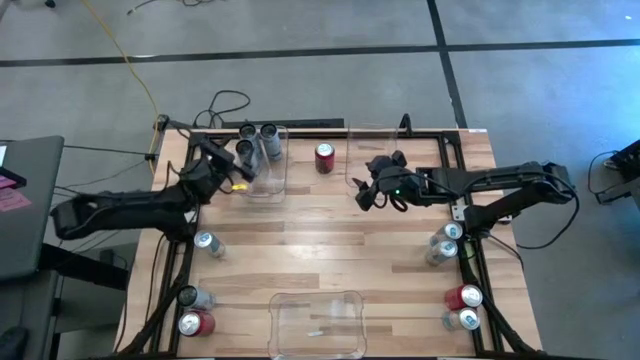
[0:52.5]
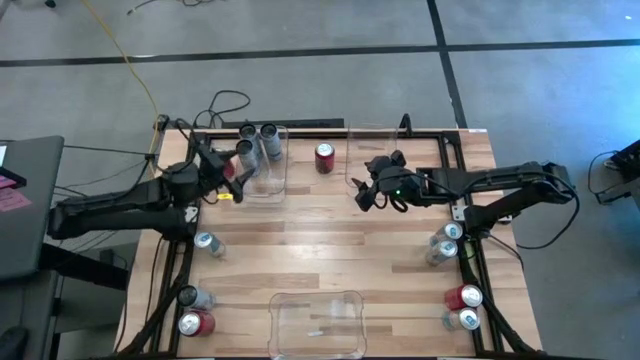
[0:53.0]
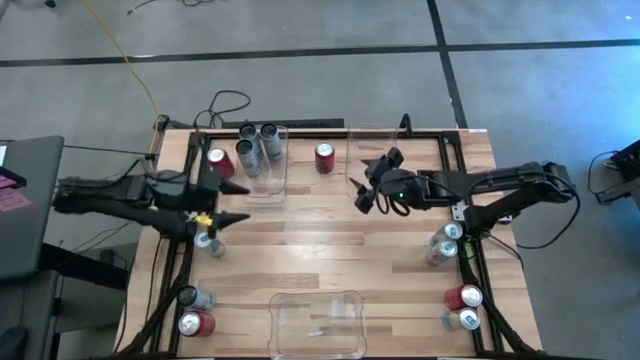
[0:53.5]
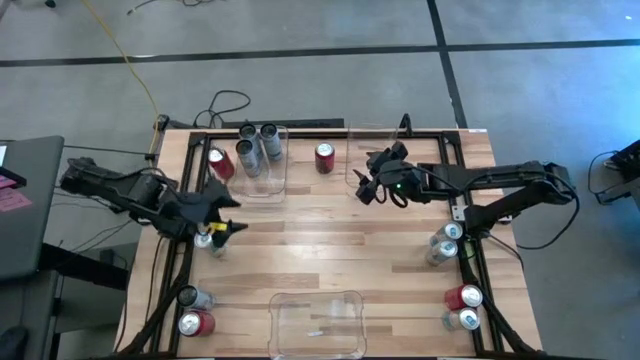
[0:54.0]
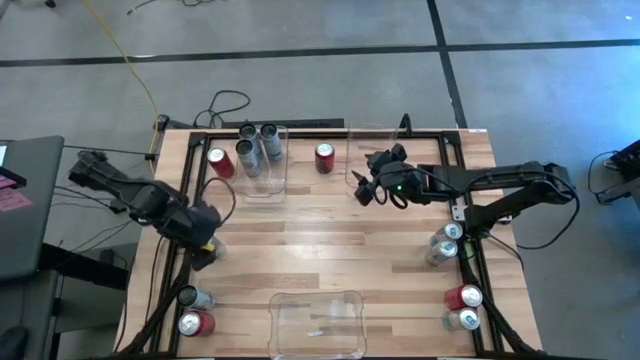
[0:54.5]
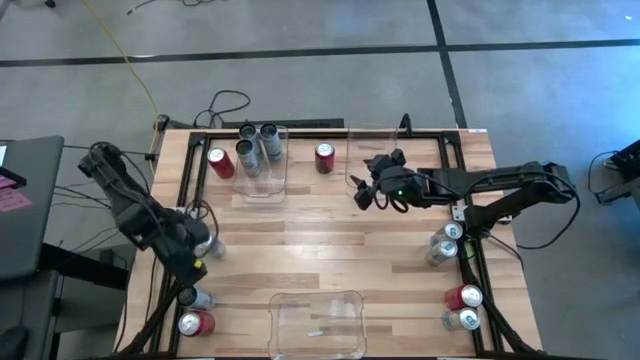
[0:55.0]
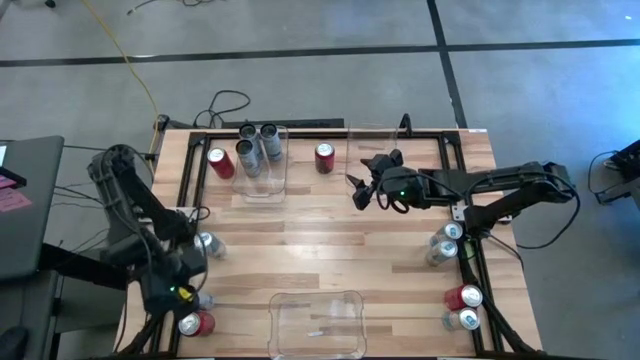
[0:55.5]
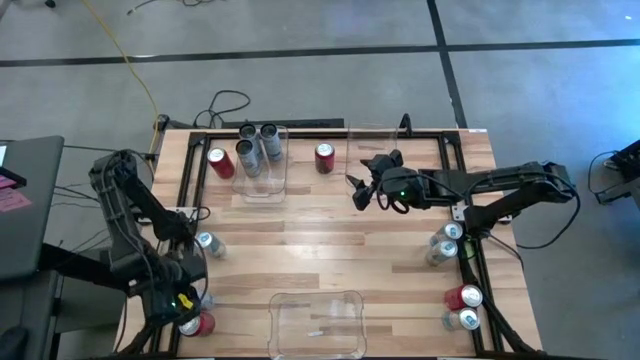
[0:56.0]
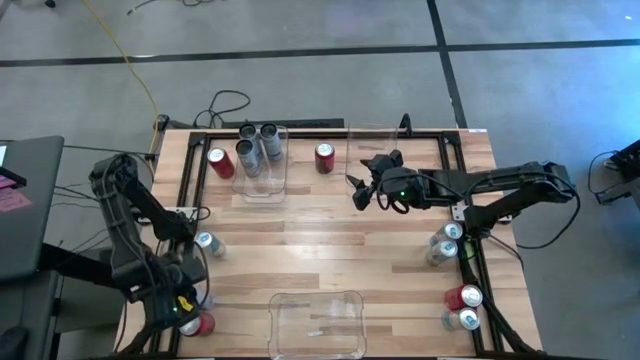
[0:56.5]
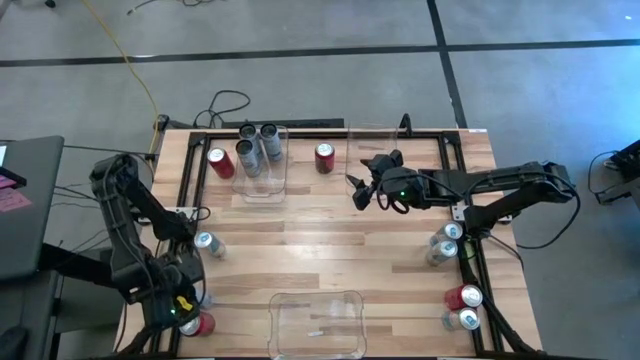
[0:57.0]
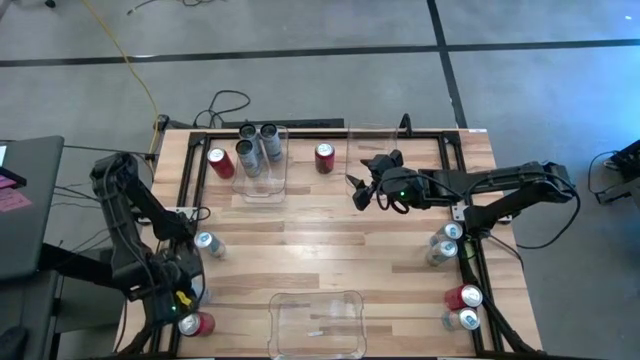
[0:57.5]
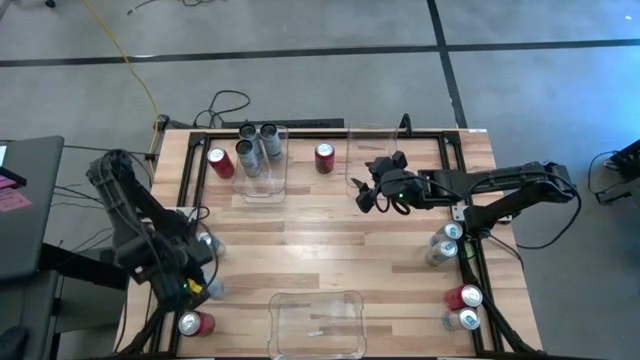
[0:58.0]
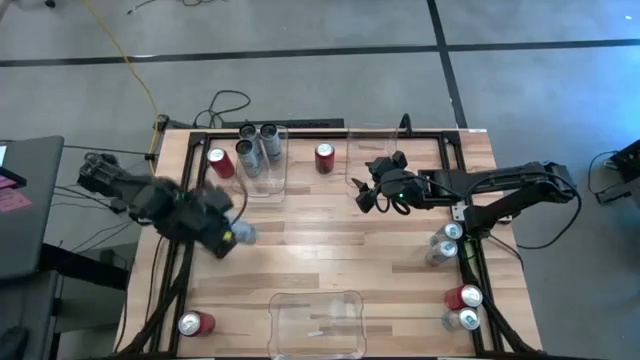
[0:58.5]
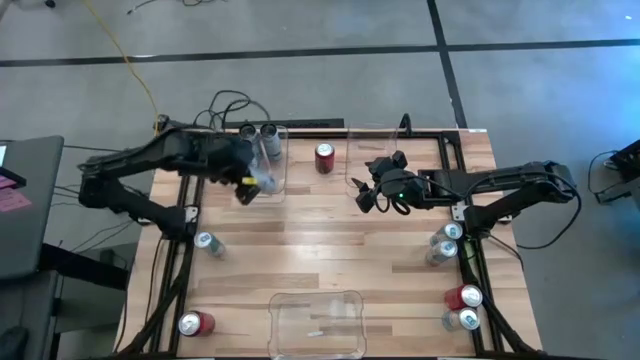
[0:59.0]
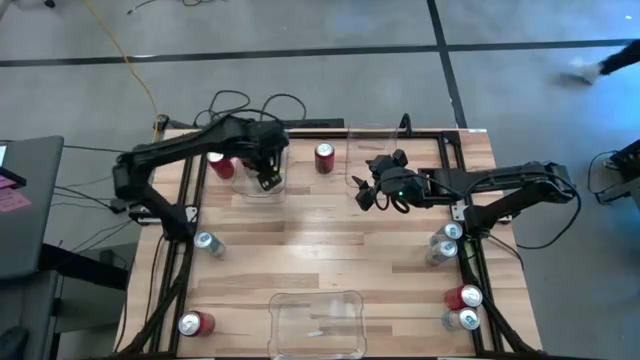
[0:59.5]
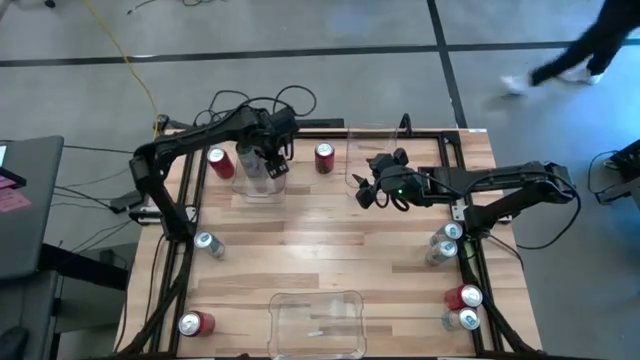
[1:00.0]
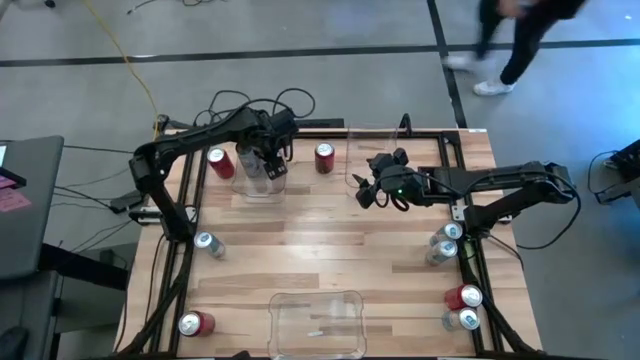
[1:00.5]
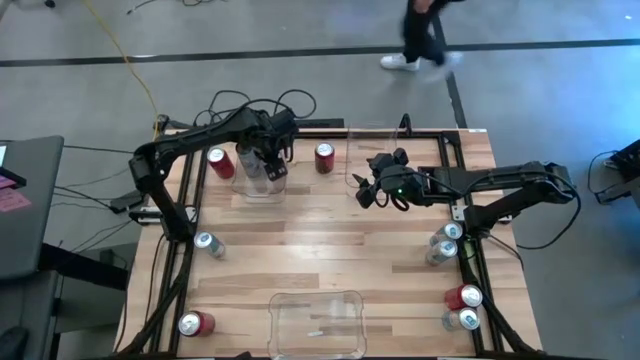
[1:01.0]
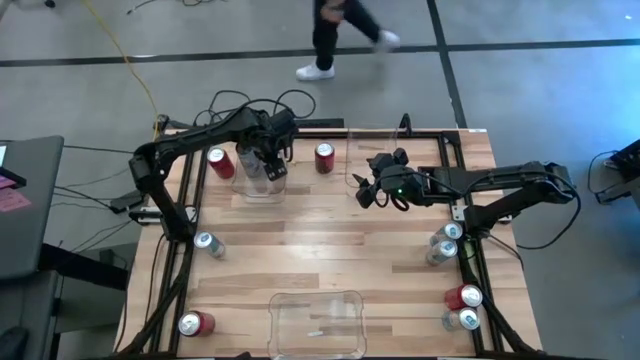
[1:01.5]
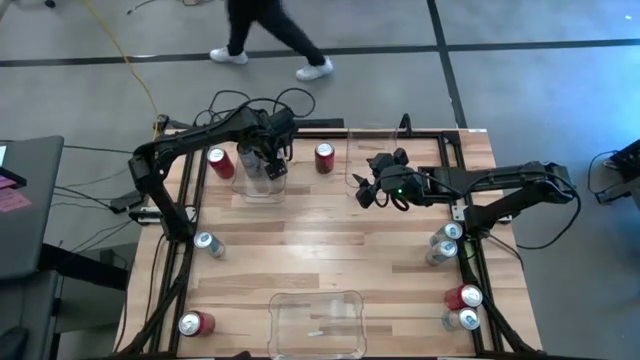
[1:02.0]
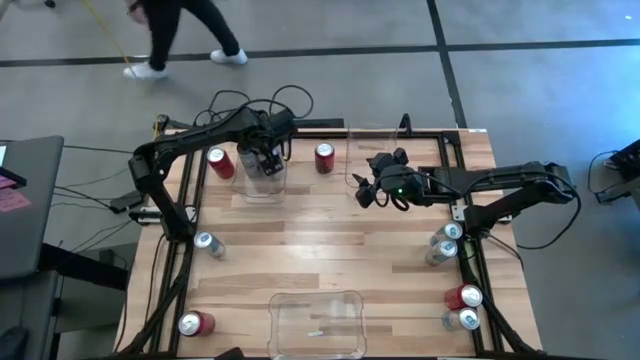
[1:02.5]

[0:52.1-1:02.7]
Task: Sort soda cans
Put the white and blue soda can into the top left transparent bin

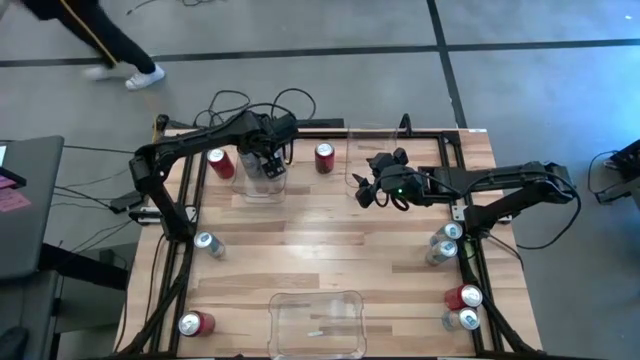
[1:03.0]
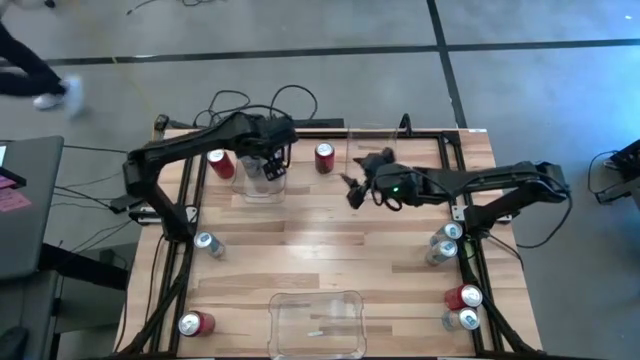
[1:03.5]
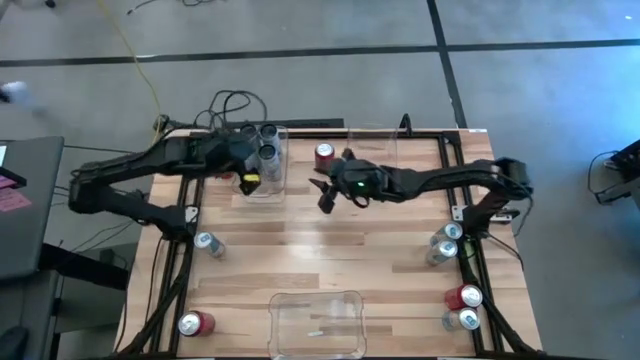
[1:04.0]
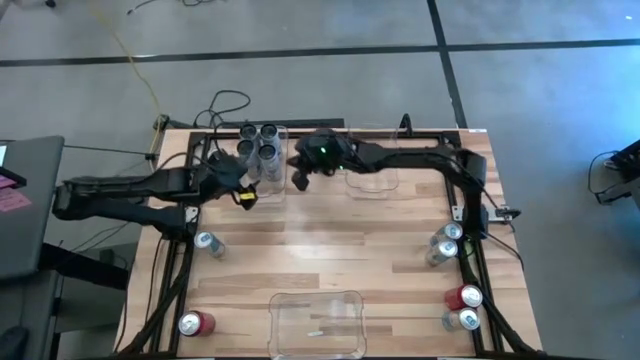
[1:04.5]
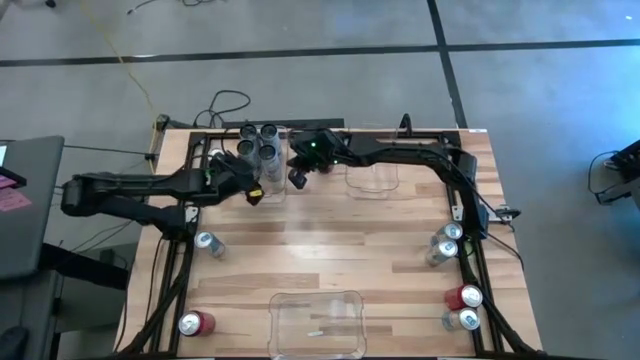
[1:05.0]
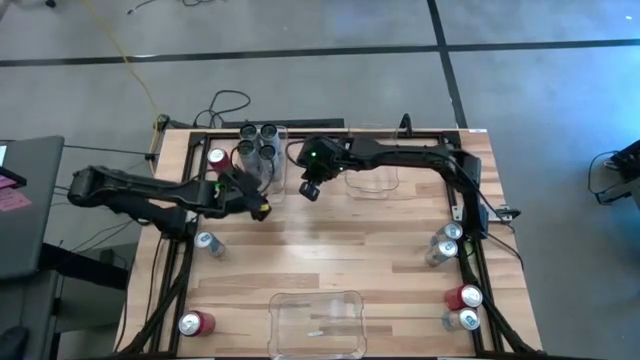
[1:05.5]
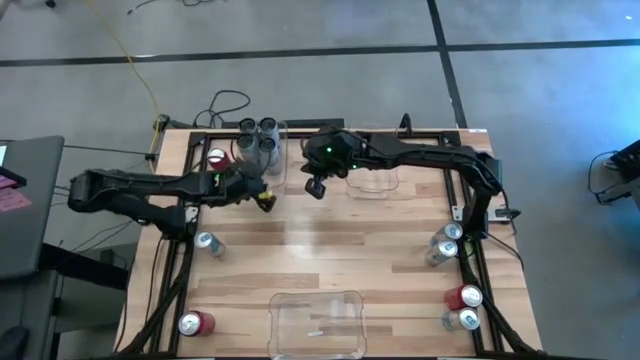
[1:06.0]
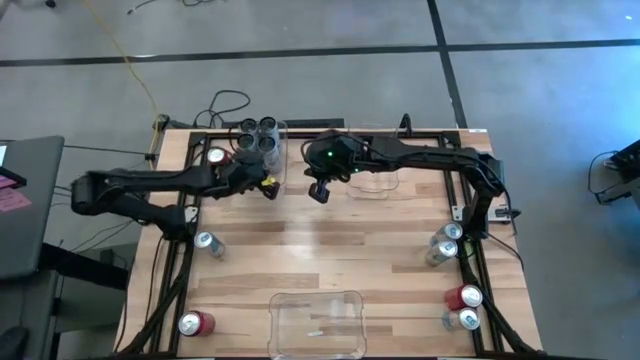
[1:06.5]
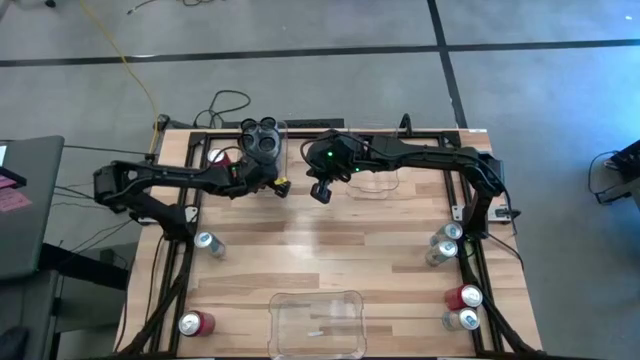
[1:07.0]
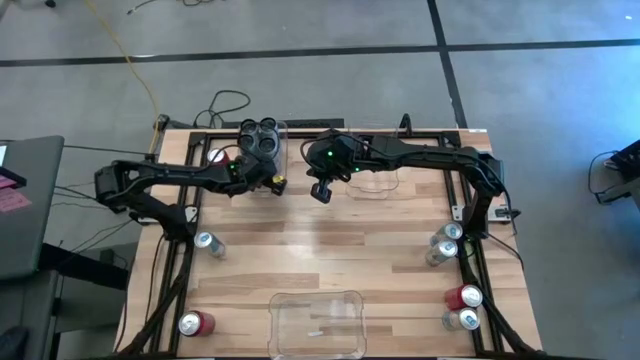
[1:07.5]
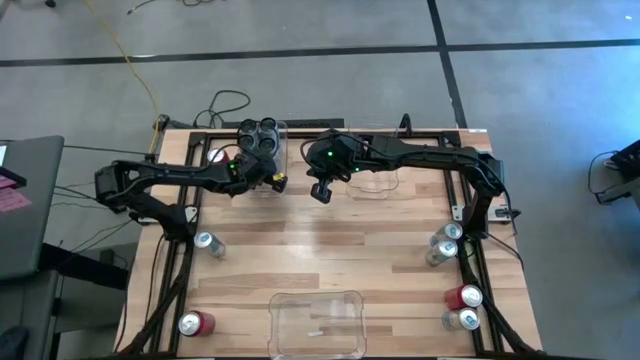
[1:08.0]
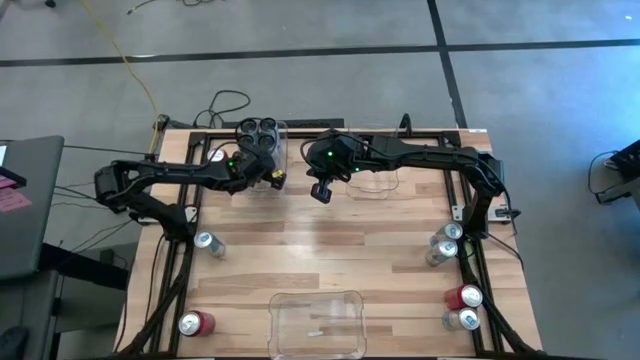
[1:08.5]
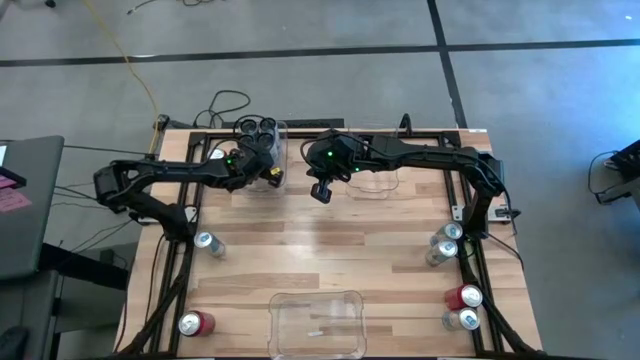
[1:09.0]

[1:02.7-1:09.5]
Adjust the white-blue soda can in the top left transparent bin

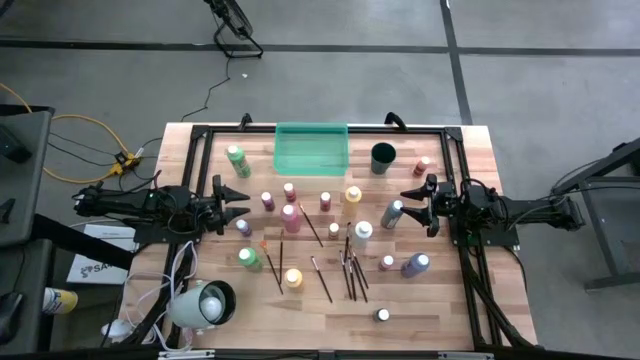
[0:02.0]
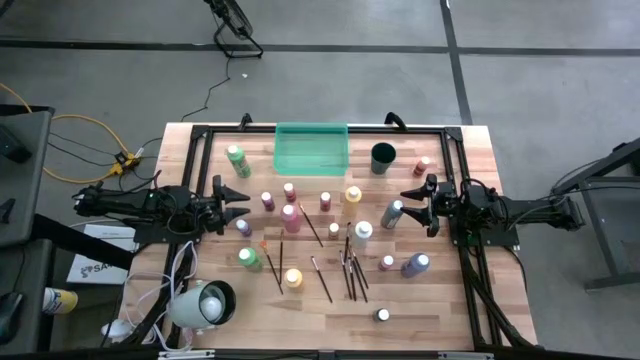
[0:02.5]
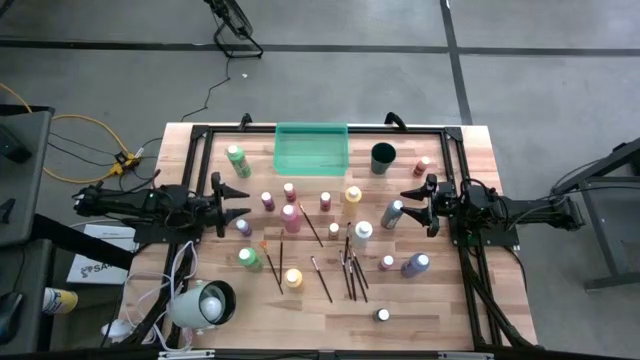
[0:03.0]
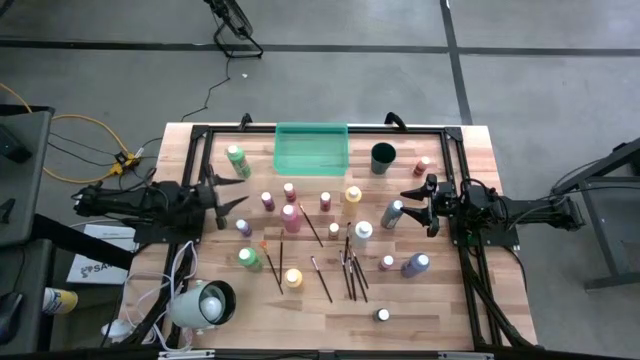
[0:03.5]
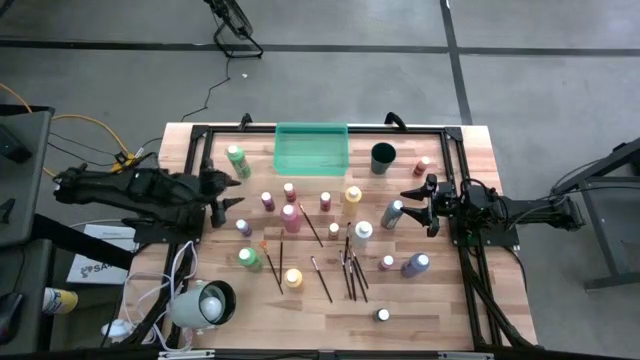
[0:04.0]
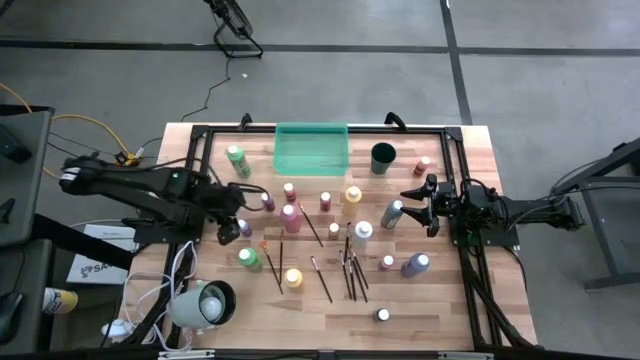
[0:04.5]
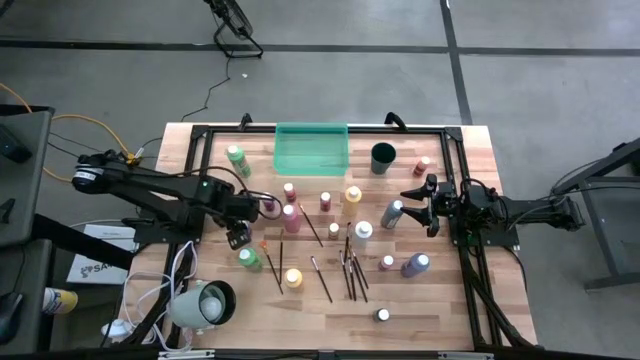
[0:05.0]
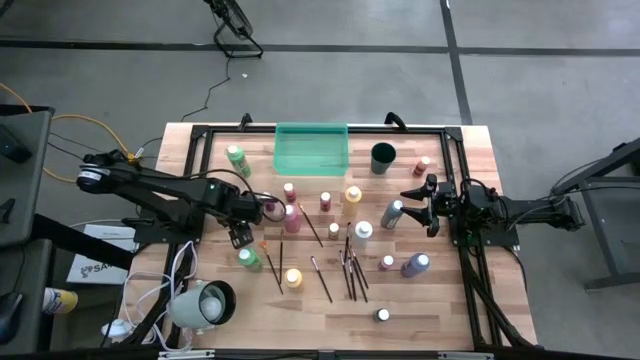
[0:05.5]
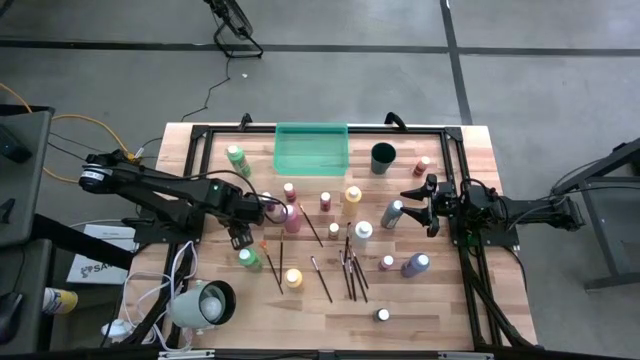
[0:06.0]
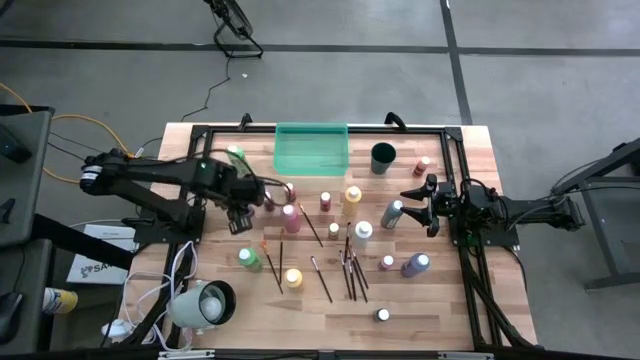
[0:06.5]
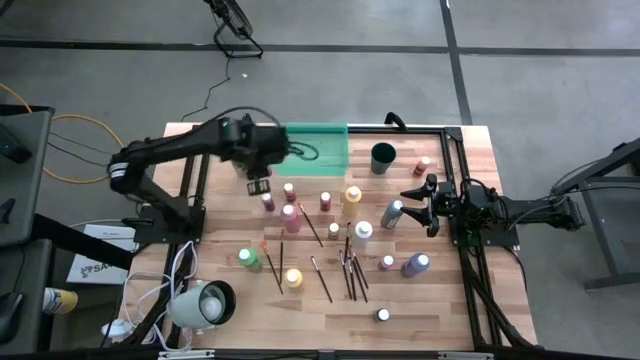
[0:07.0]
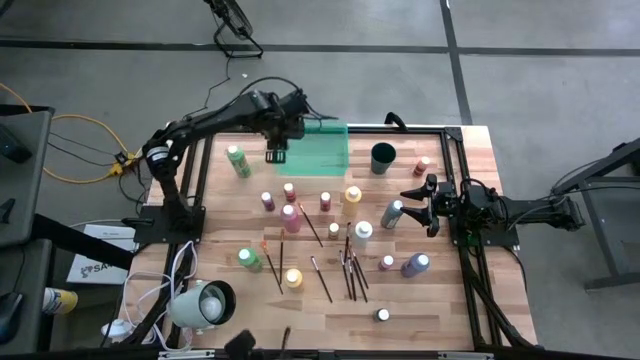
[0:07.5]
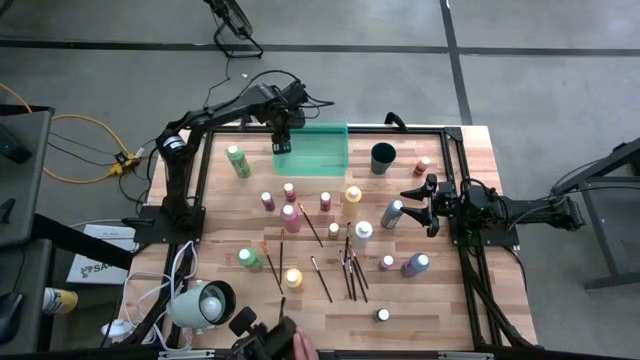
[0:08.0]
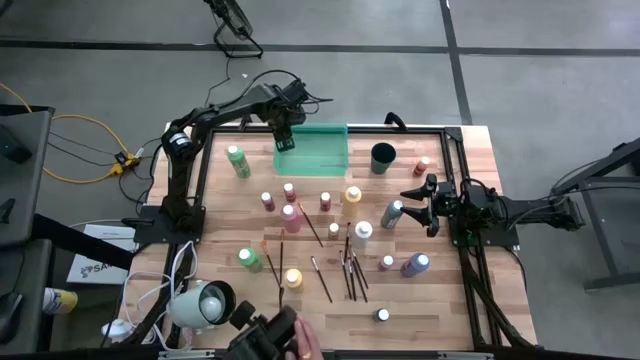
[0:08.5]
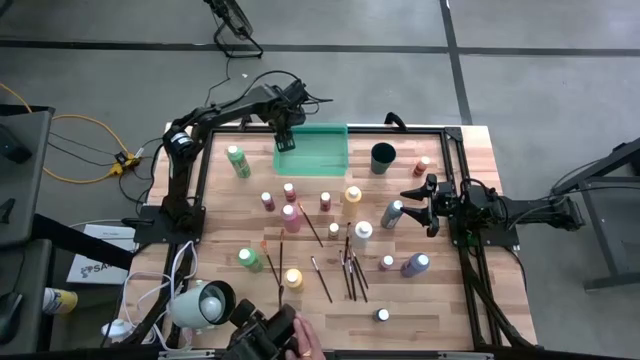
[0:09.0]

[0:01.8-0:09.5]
Task: Pick & Place Paint Supplies
Put the violet paint bottle into the green bin
